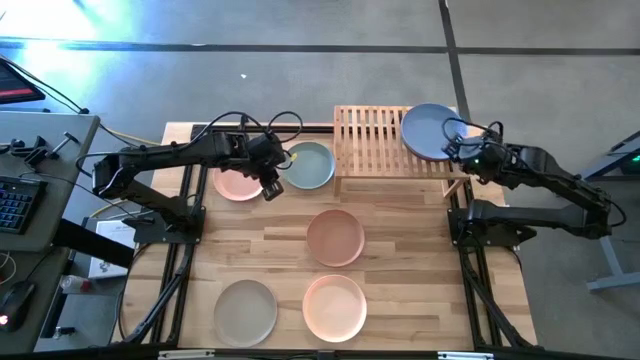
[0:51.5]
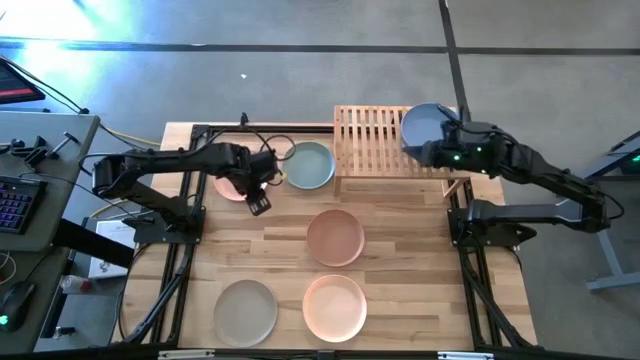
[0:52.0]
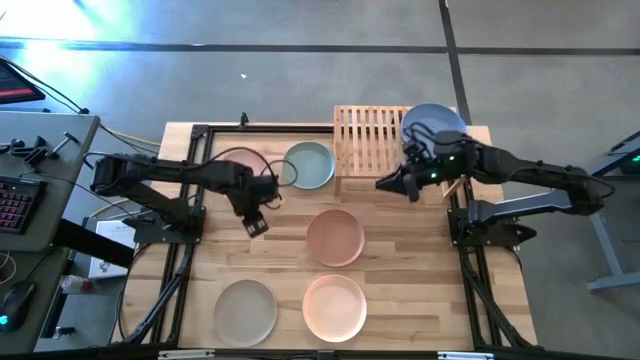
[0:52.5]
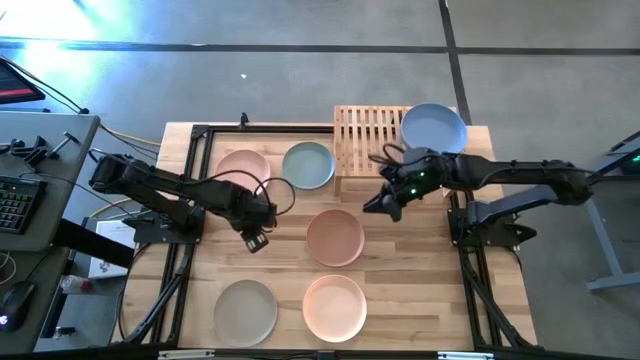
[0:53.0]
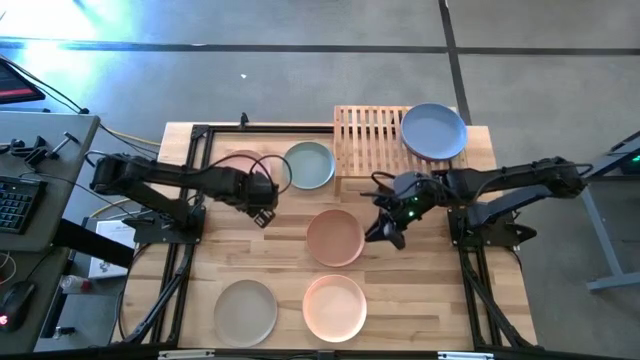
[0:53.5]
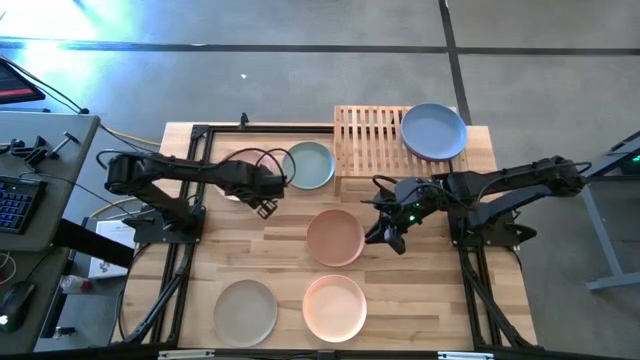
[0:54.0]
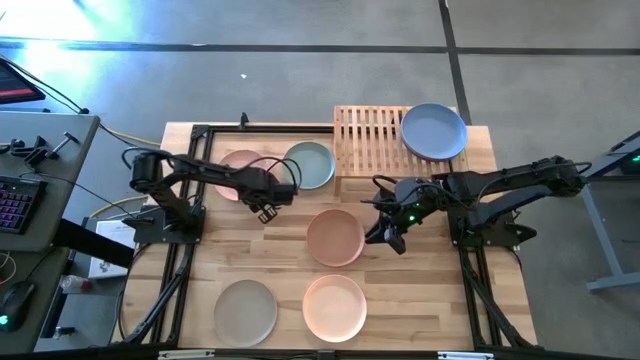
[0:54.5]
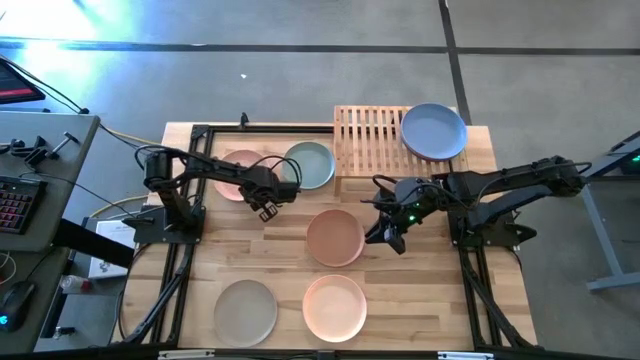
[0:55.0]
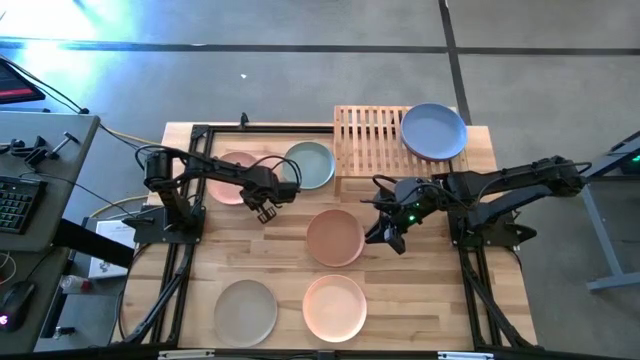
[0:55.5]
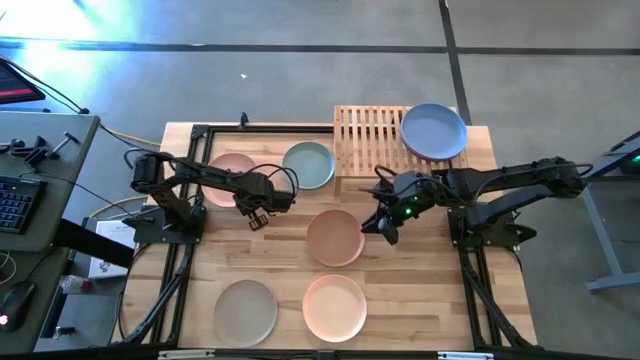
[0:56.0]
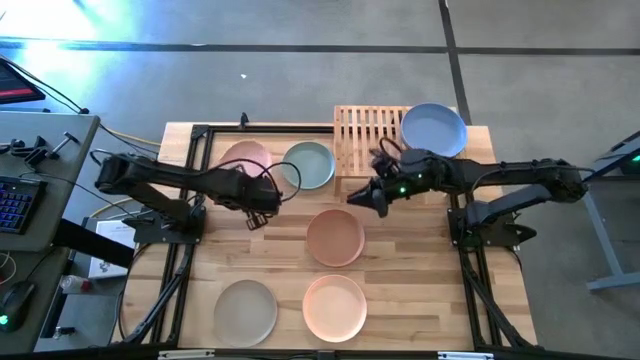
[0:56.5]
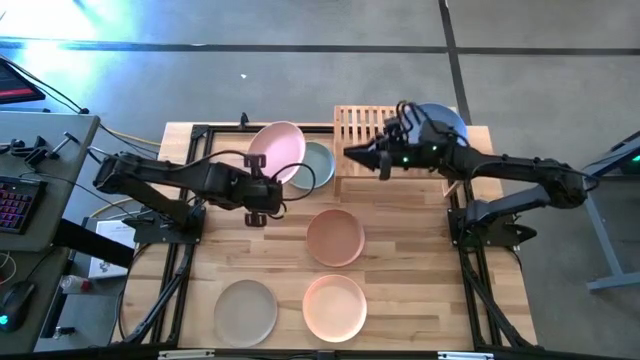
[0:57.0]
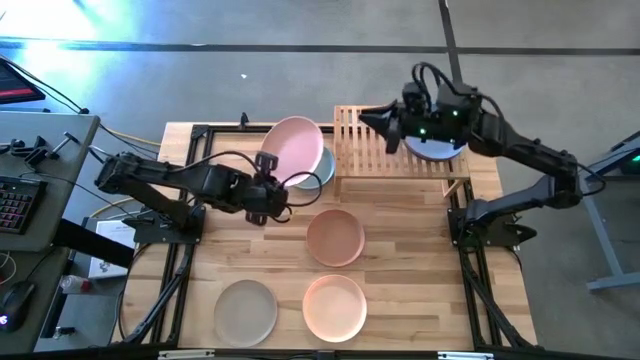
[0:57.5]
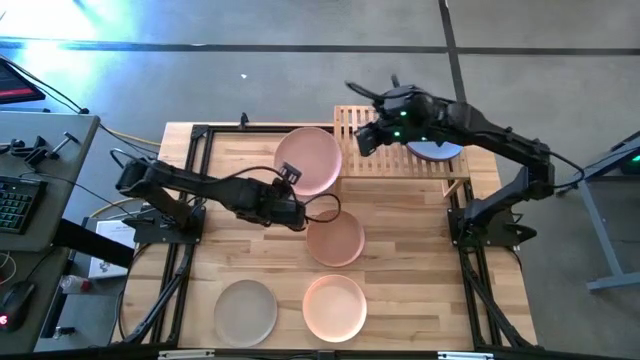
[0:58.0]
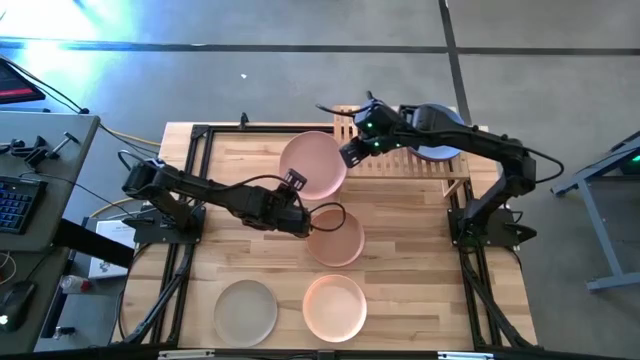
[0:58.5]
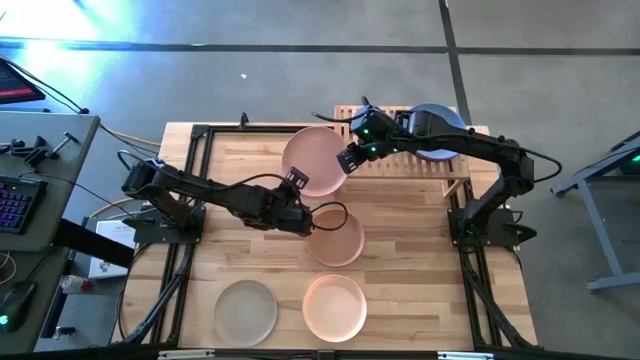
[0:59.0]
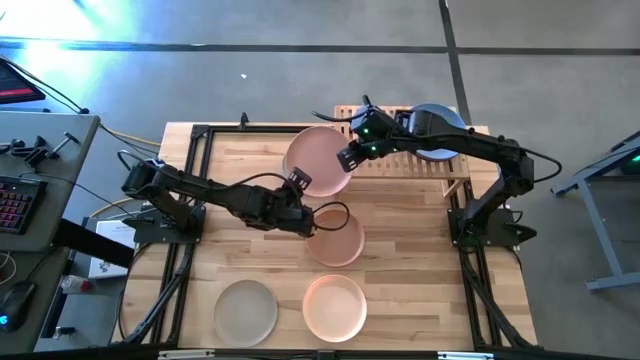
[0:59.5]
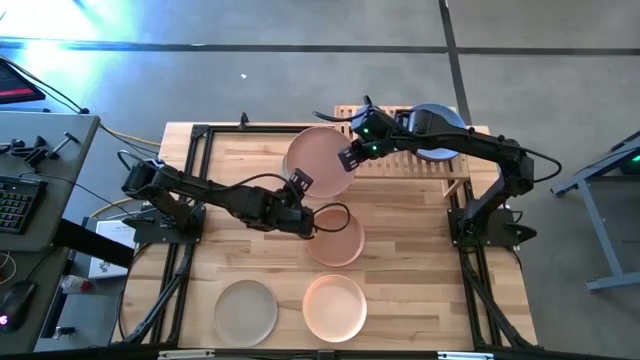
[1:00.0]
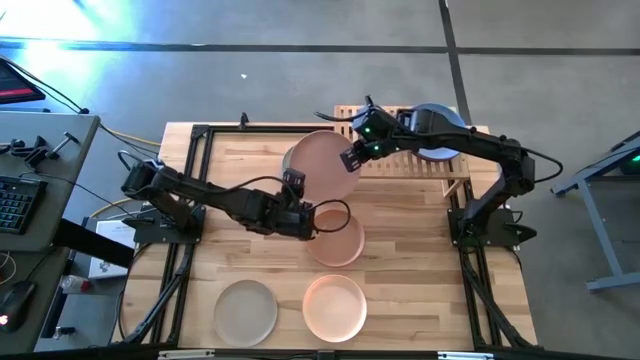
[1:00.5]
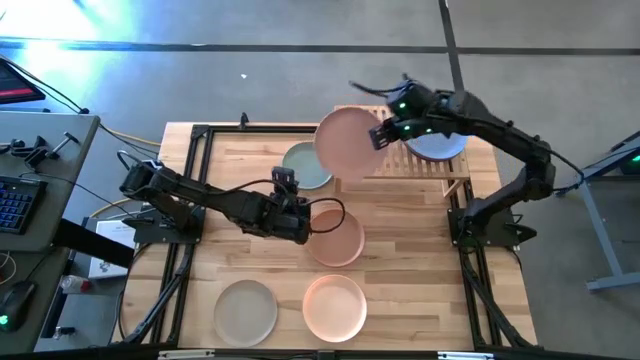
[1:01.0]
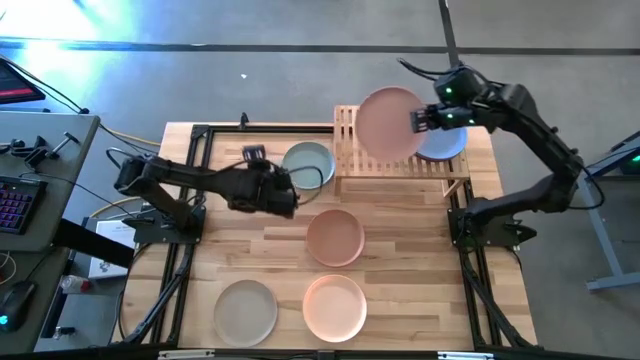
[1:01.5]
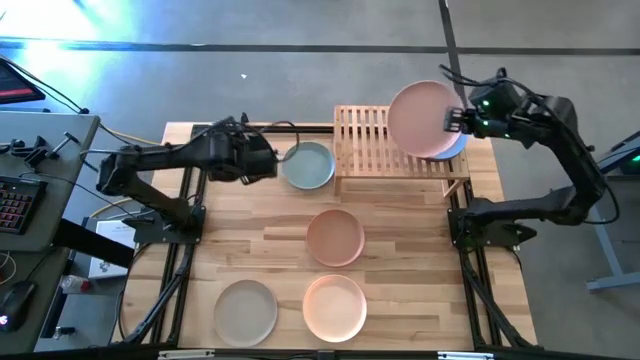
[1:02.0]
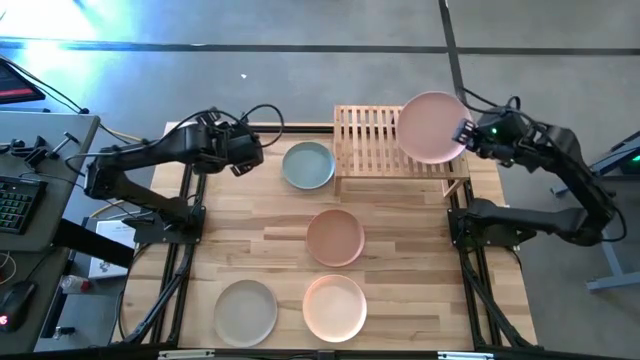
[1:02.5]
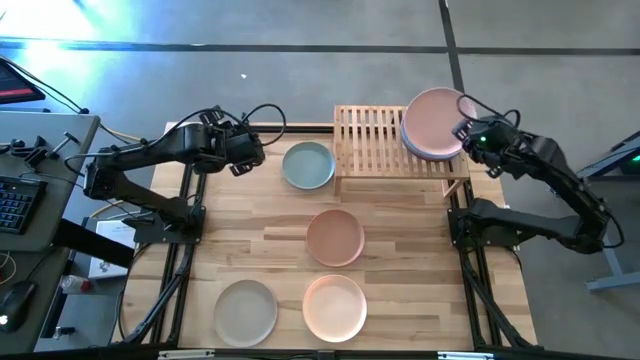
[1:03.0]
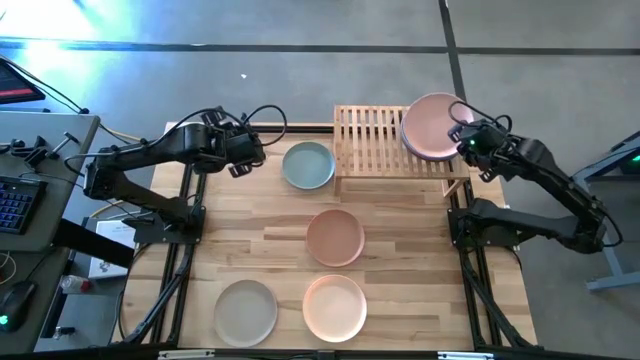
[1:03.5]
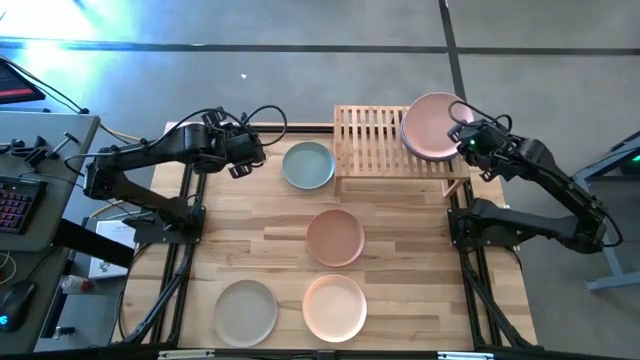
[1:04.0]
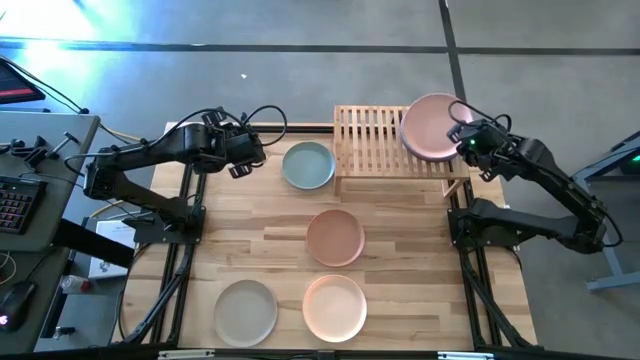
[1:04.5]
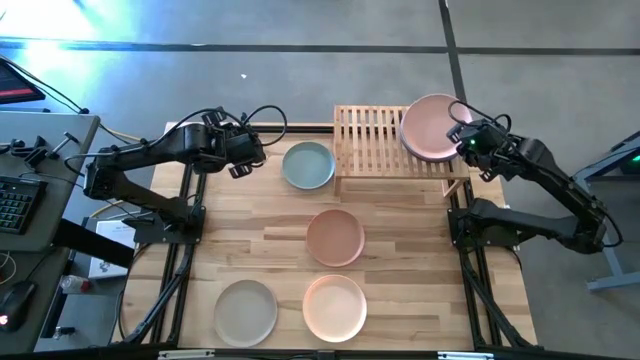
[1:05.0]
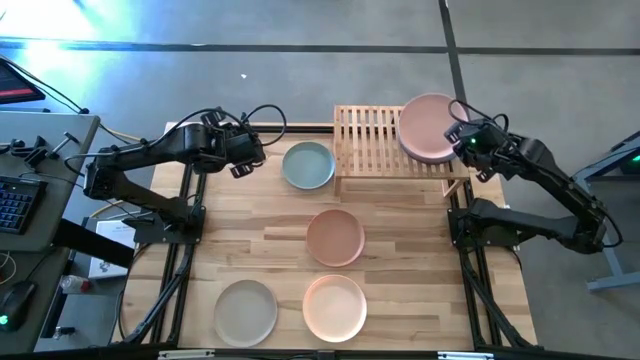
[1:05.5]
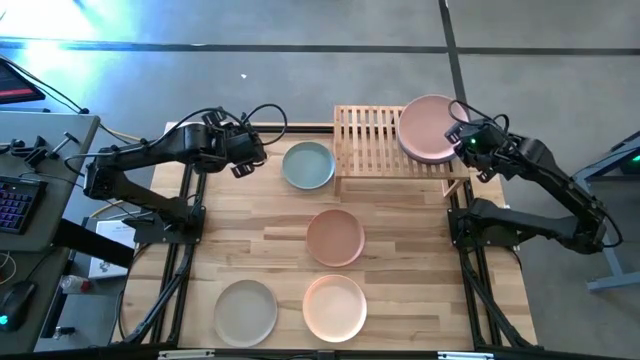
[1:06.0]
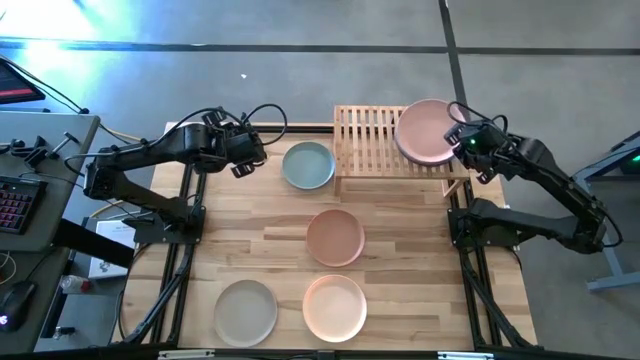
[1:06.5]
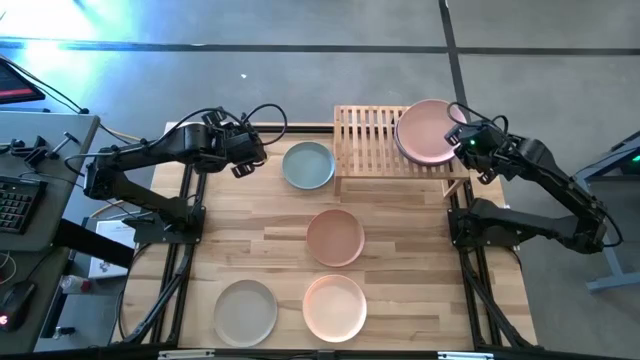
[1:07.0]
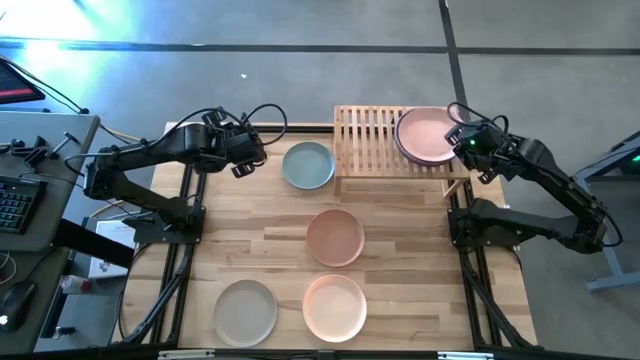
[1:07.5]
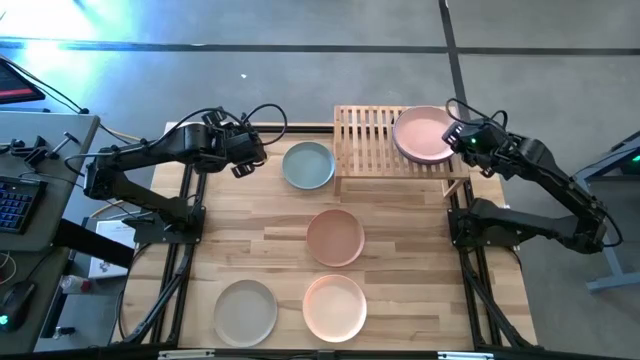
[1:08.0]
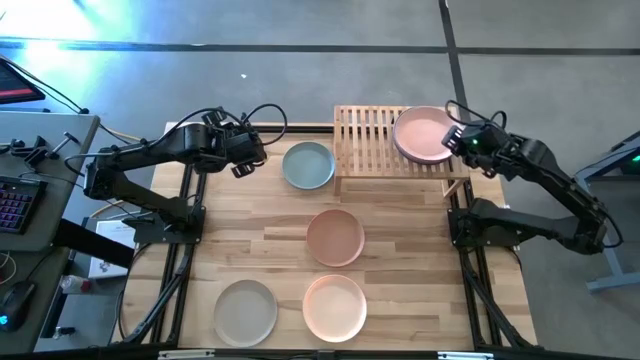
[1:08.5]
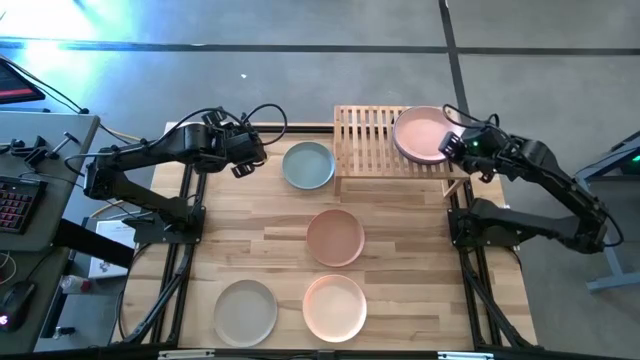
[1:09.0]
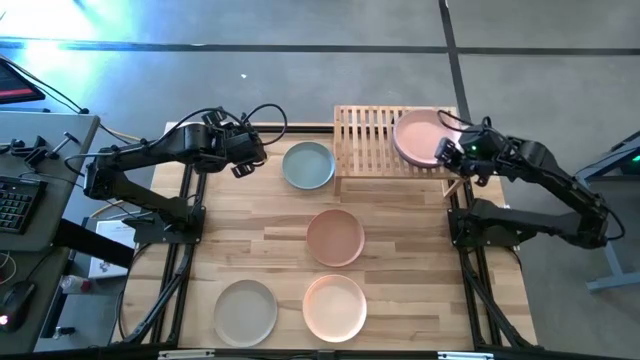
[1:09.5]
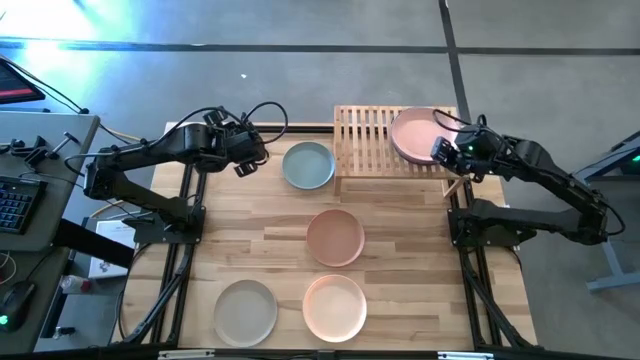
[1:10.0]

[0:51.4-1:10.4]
Task: Place and stack plates onto a shelf
Stack the light pink plate on the top of the blue plate on the shelf

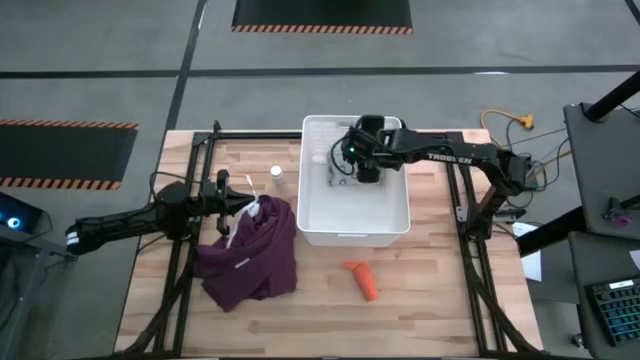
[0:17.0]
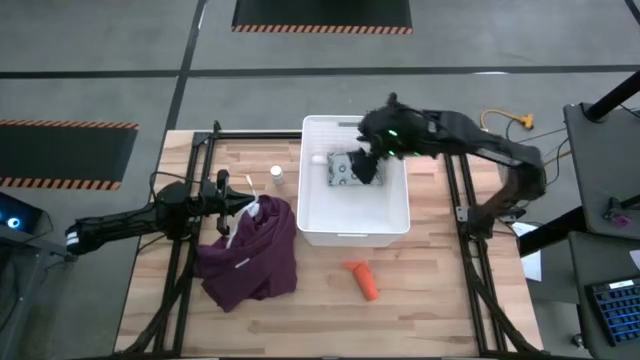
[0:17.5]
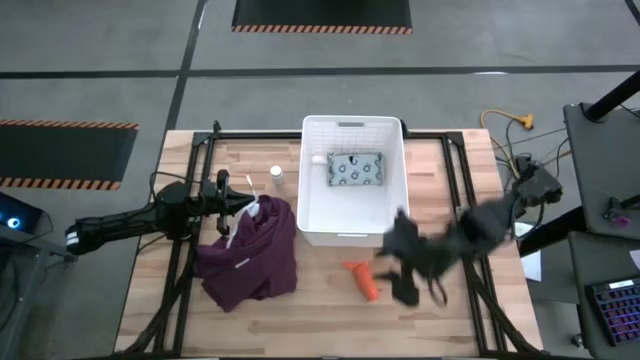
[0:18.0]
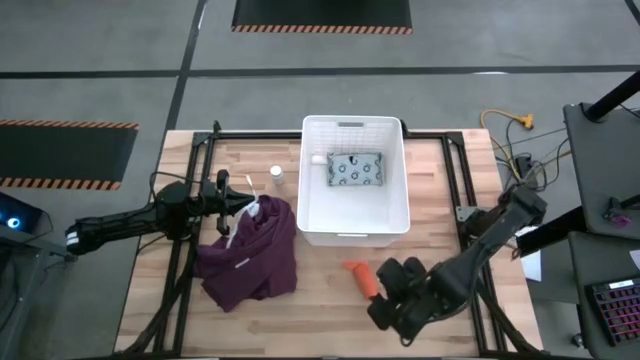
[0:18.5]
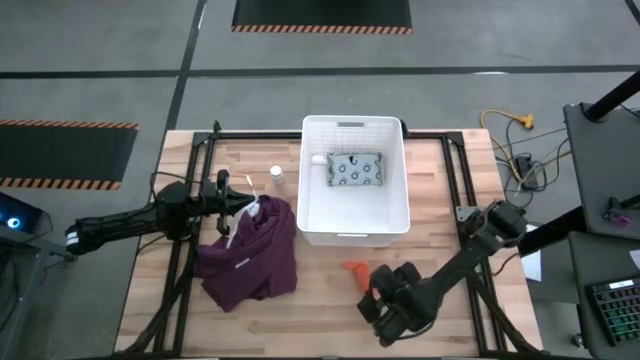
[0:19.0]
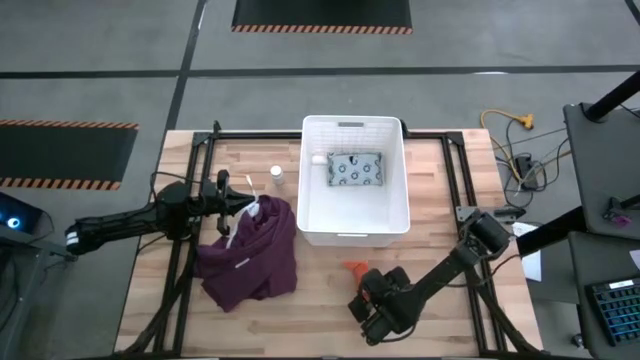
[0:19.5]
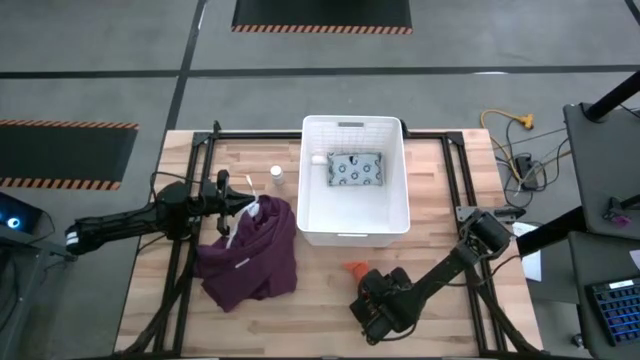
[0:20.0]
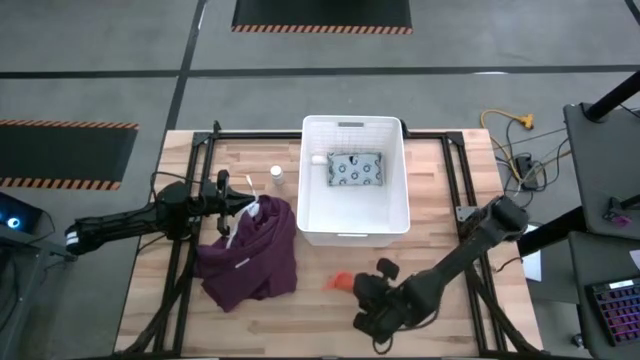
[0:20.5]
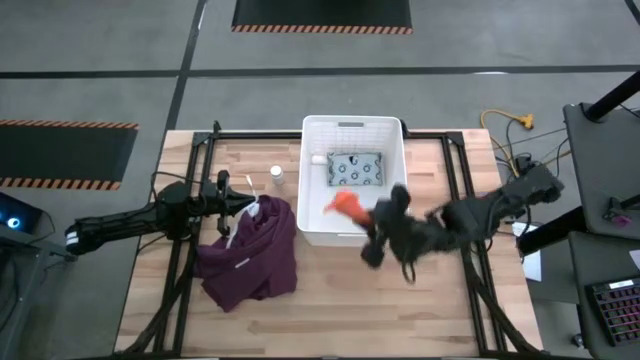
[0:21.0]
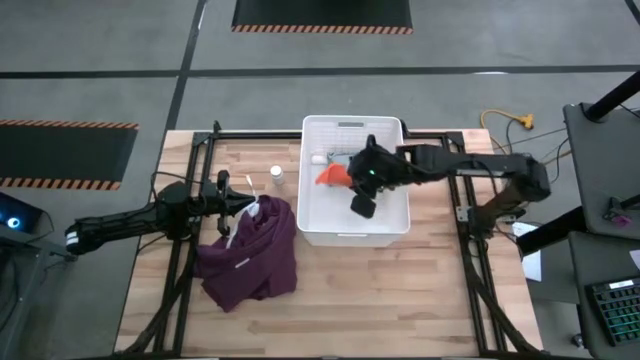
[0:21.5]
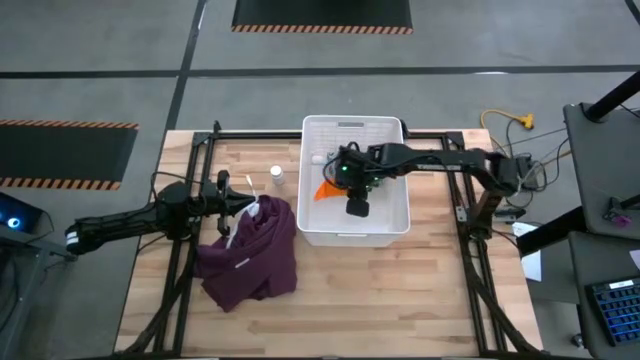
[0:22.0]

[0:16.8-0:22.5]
Task: Pick & place medical supplies in basket/bin
Put the orange bandage into the white bin
